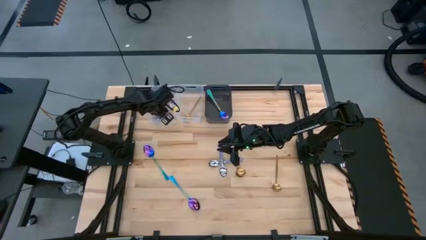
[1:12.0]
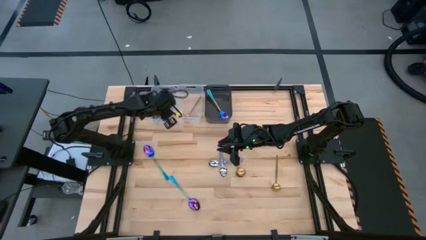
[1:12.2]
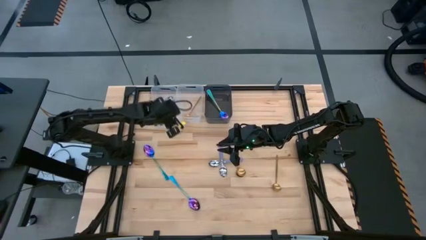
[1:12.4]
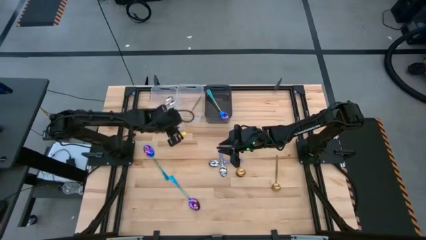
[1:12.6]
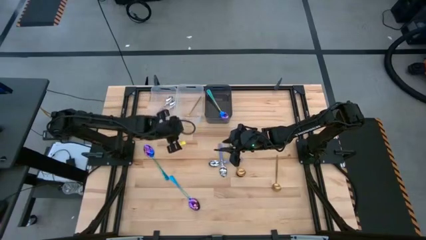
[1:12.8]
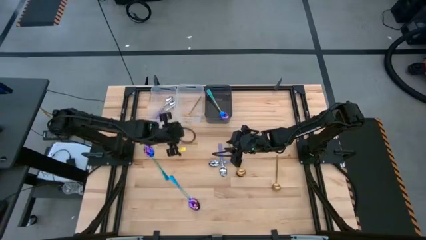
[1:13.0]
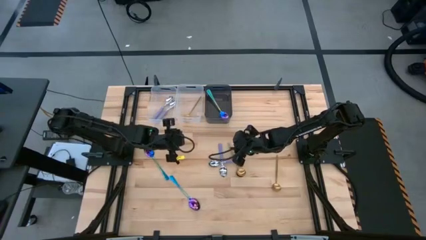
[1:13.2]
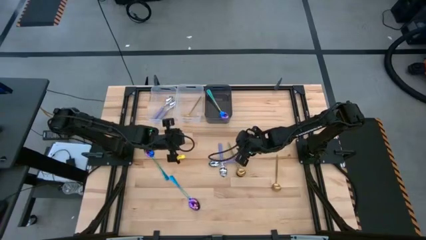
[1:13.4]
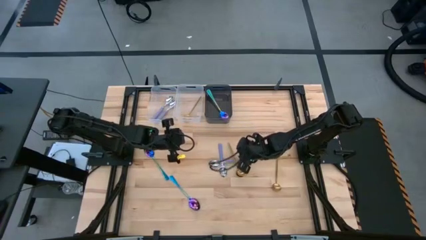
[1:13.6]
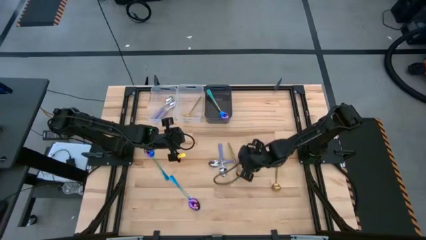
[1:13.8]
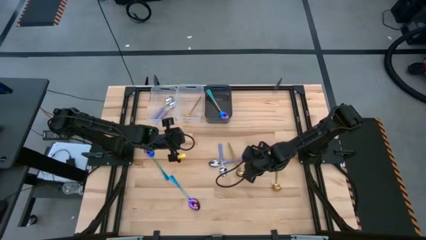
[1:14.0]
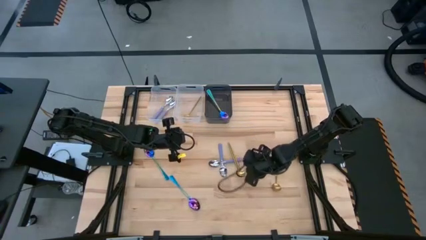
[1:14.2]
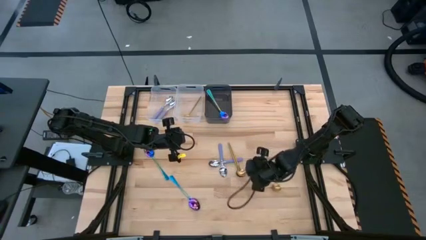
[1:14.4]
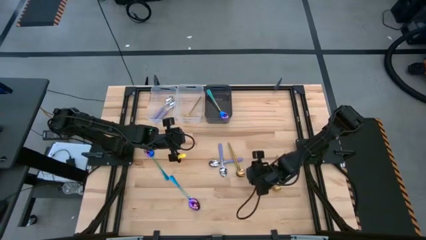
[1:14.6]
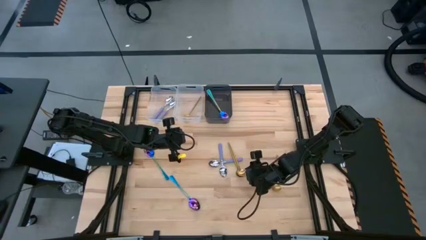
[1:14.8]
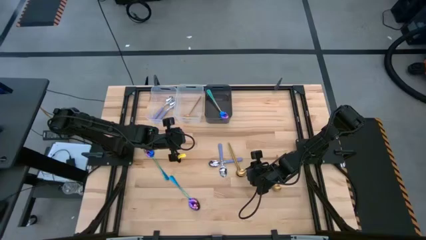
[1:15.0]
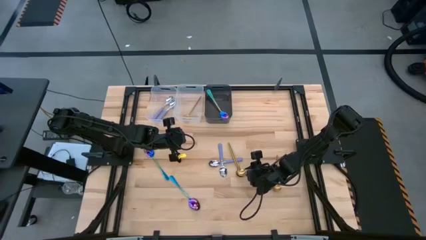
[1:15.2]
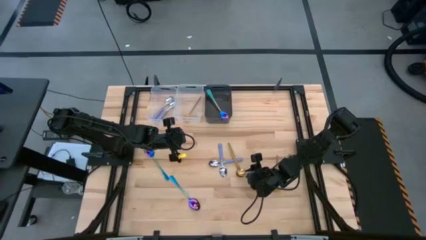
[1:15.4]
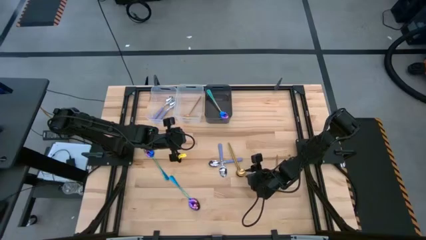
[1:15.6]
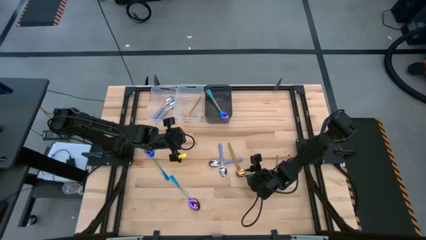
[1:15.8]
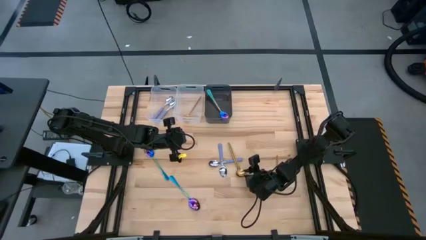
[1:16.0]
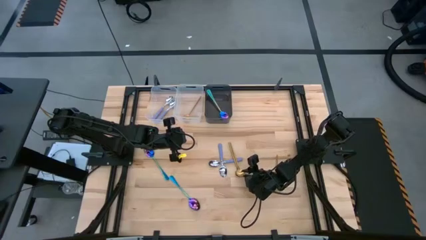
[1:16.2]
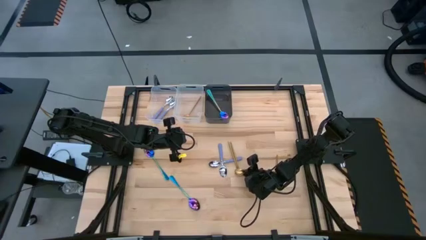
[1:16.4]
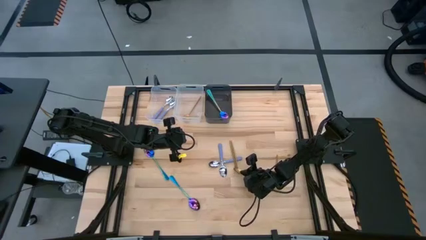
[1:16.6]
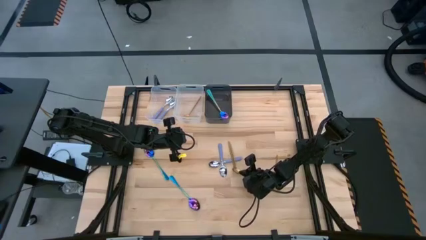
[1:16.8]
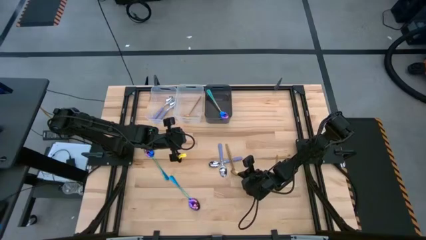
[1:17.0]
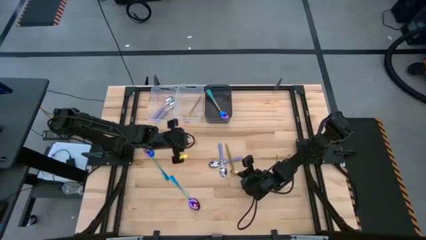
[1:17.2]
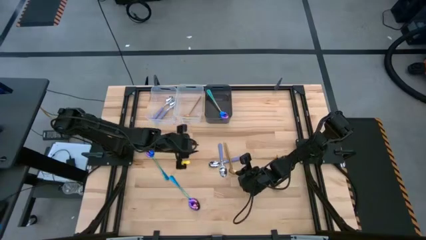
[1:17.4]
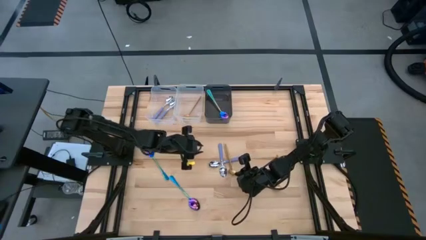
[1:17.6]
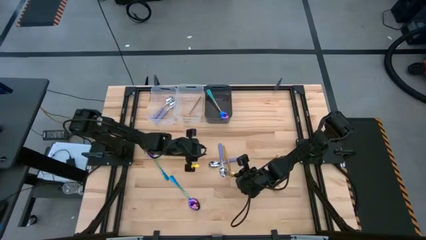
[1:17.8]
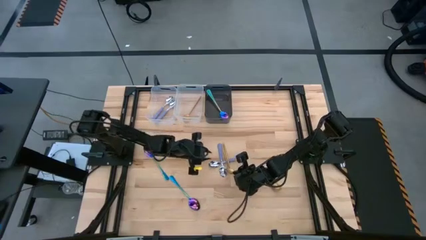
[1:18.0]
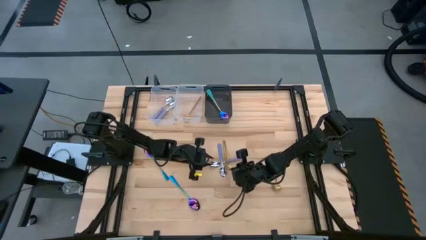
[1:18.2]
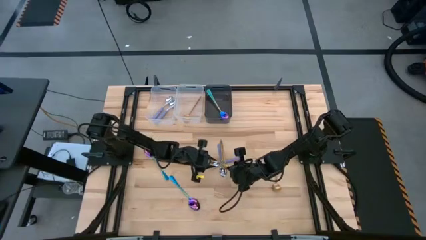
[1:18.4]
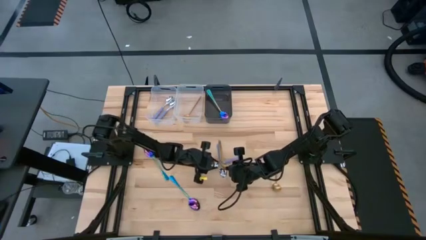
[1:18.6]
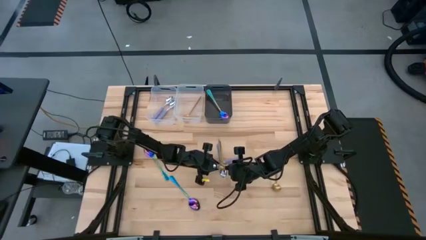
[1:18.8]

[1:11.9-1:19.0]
Task: Sort silverware by color (type)
Put the gold spoon into the right transparent bin

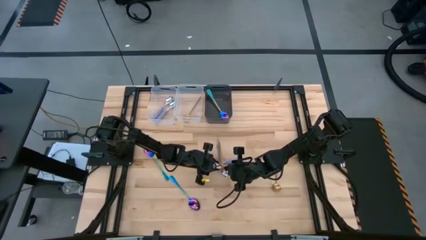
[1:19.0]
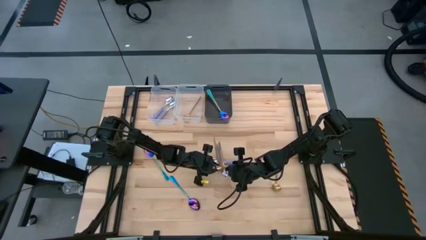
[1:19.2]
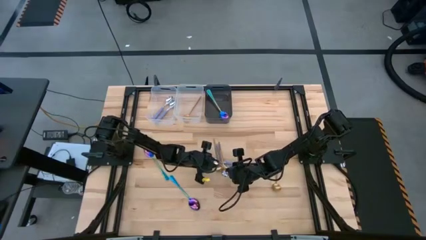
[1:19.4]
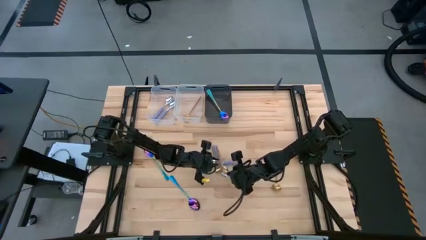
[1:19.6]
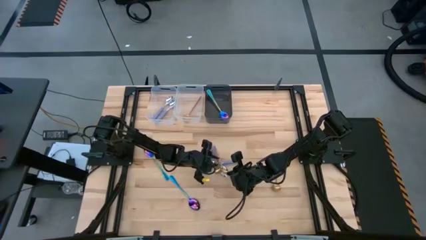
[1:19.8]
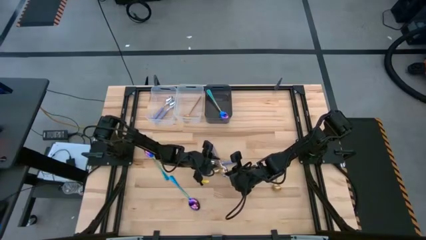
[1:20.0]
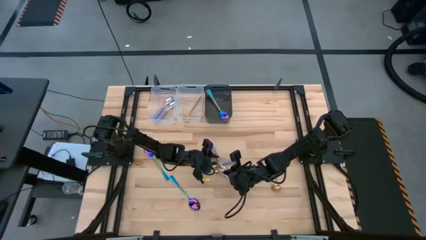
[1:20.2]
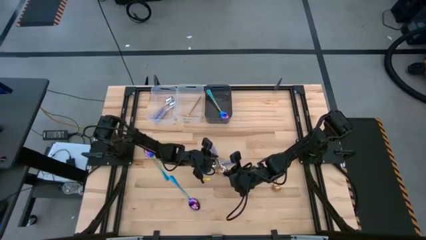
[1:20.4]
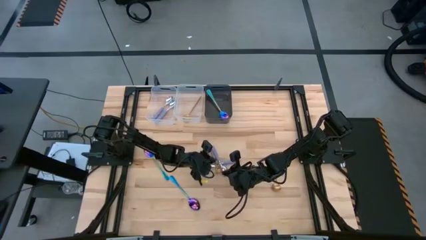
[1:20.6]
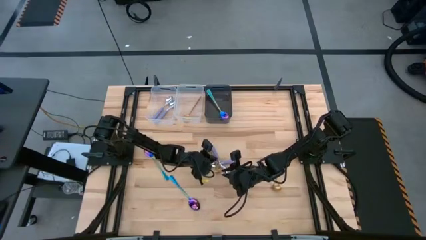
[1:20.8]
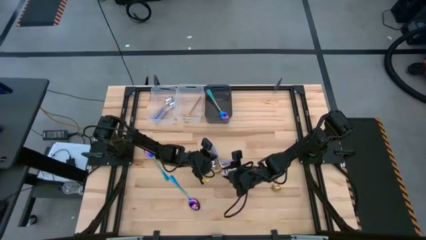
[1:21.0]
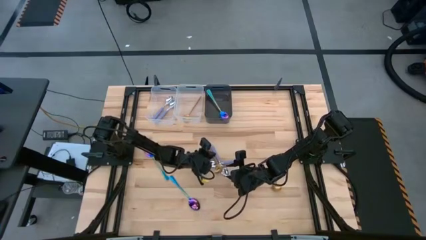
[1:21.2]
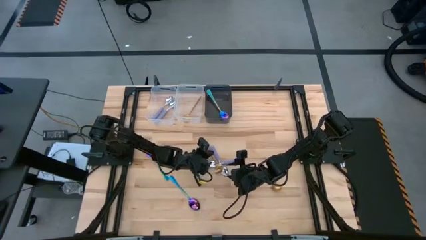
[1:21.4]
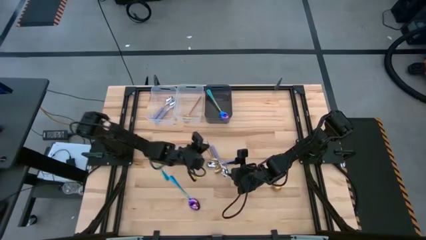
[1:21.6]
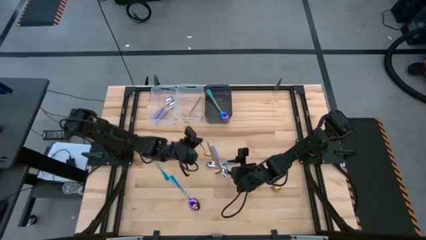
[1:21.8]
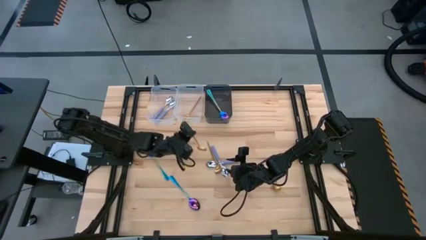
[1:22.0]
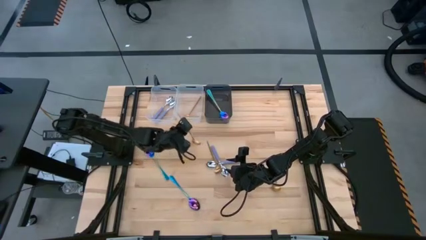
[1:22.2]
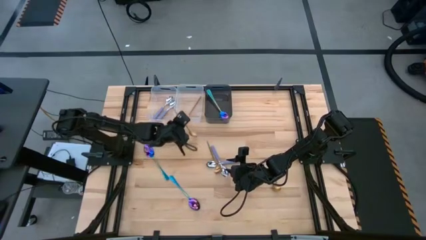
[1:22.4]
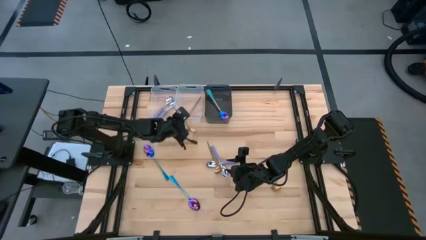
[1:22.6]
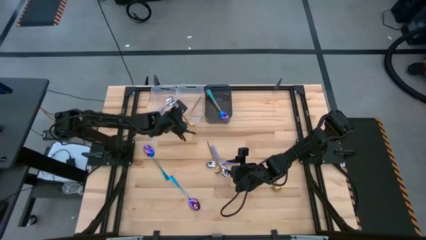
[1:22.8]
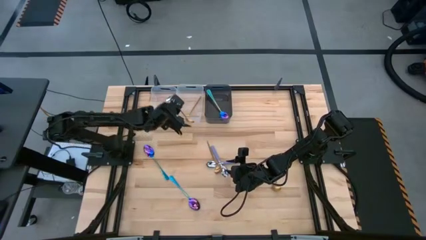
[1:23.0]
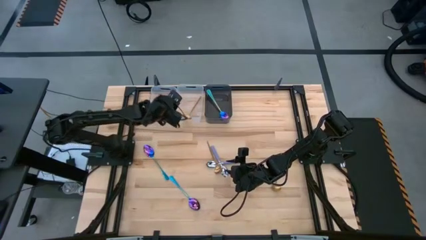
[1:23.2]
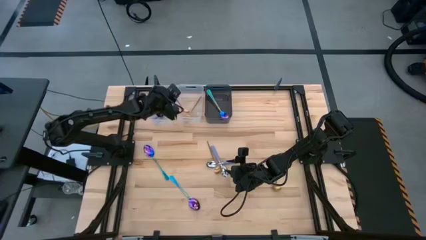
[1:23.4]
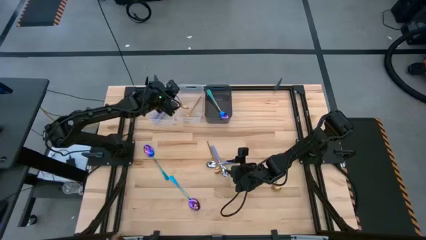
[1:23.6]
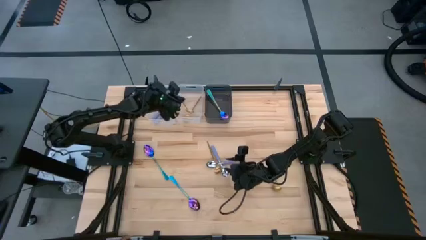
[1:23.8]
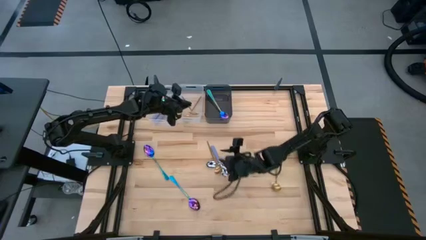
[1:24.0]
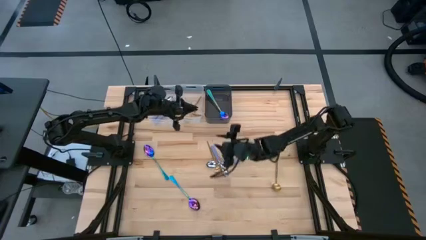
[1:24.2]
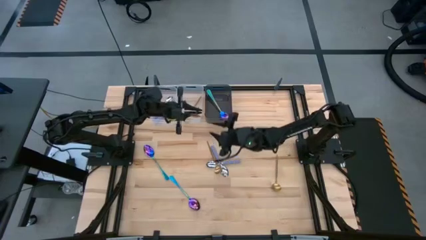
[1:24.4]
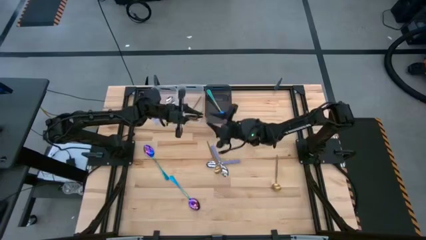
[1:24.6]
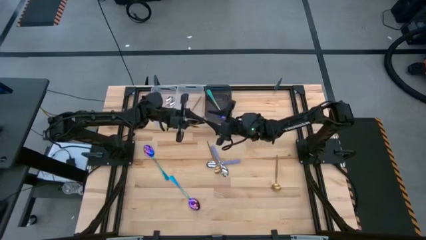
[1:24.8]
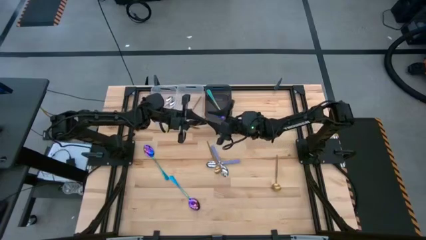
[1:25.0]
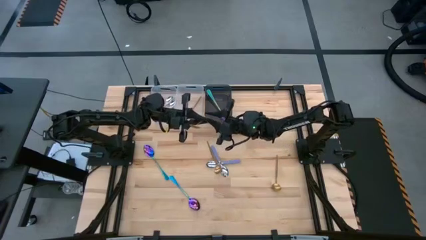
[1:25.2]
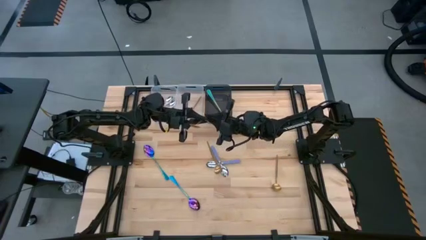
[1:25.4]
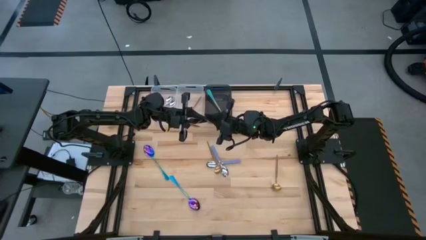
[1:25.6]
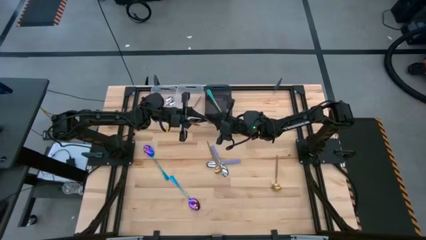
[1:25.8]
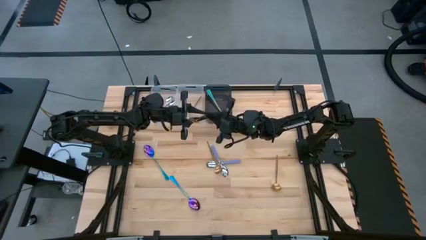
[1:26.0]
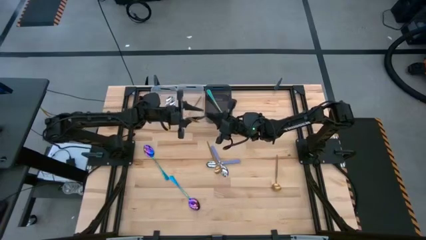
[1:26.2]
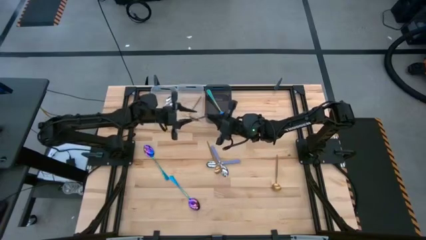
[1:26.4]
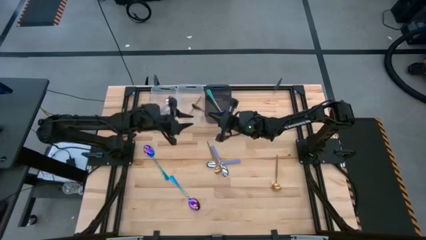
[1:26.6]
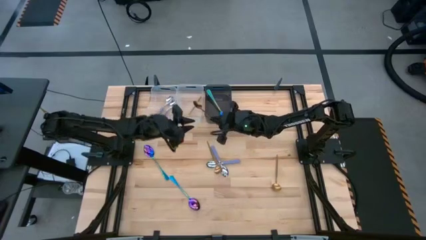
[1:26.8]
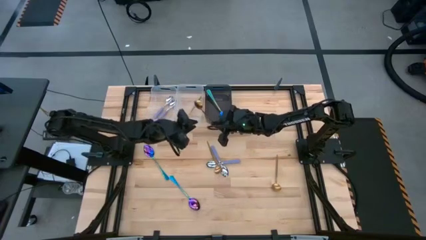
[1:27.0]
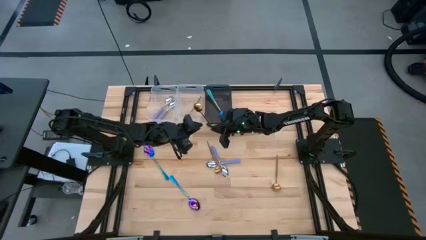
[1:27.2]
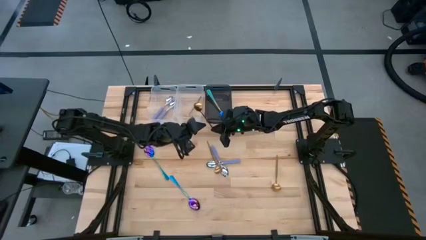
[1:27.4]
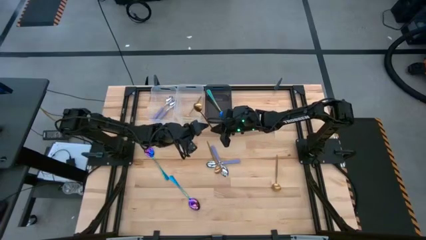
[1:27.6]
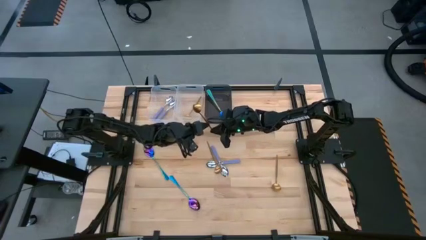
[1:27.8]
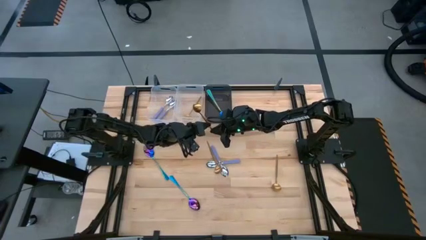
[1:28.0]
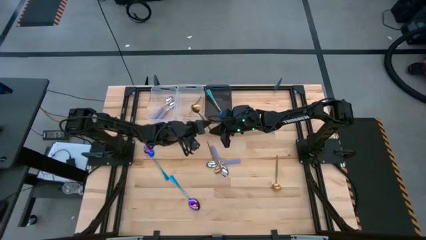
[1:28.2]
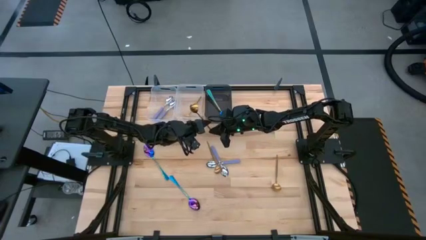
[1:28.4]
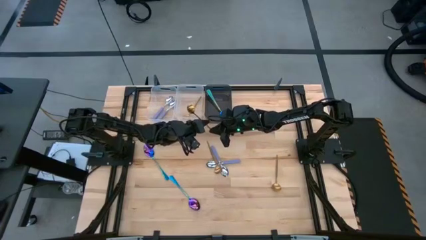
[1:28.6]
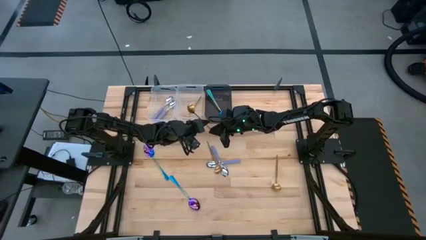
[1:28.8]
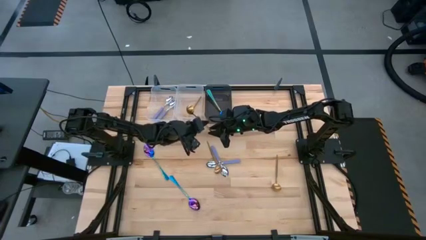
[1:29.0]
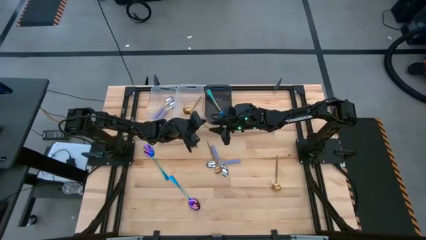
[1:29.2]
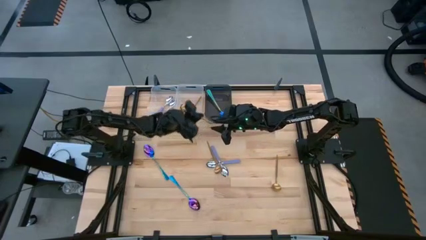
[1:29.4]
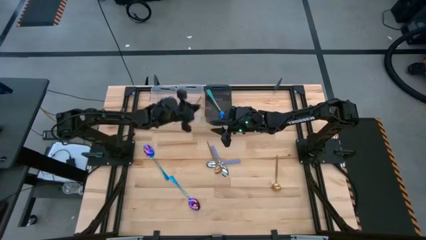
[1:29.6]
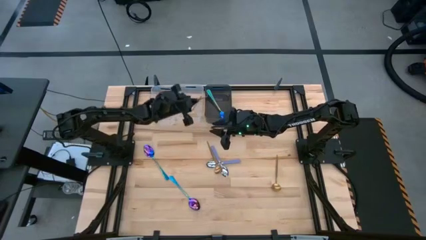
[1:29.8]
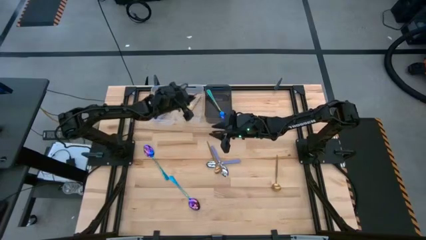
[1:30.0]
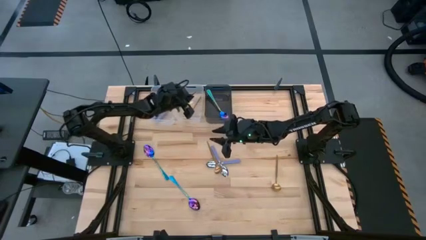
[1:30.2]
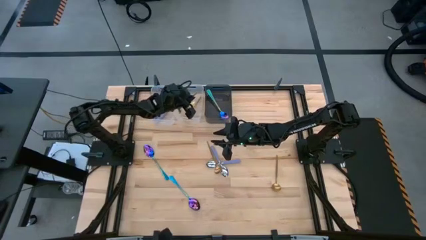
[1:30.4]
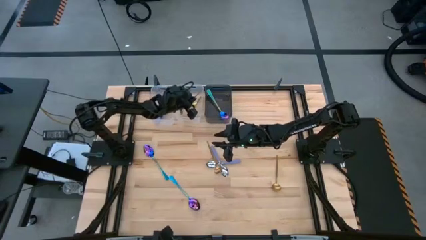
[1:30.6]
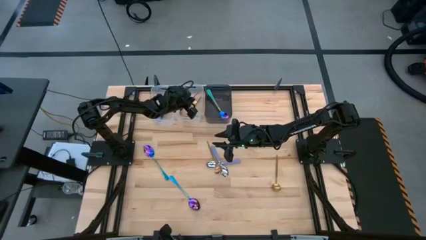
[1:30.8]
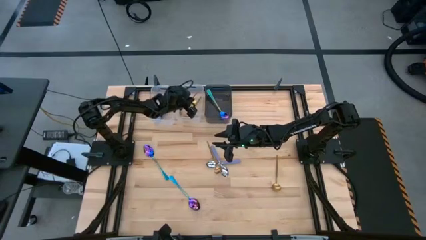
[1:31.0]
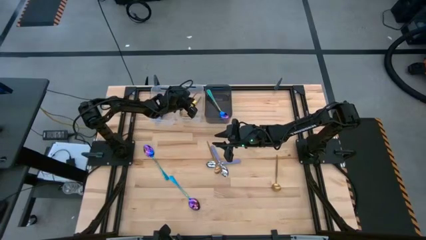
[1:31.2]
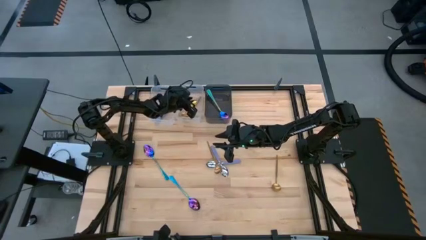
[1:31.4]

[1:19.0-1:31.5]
Put the gold spoon into the right transparent bin
